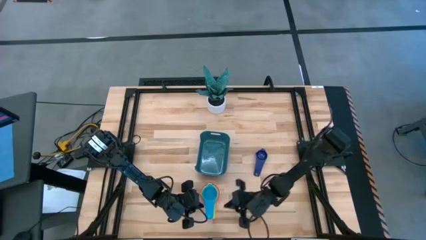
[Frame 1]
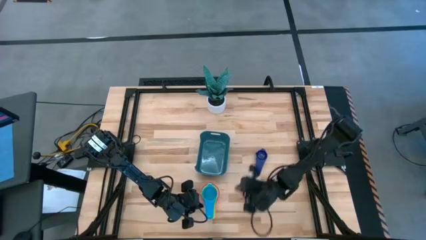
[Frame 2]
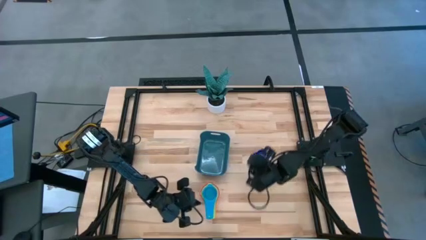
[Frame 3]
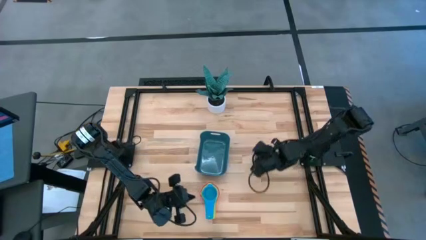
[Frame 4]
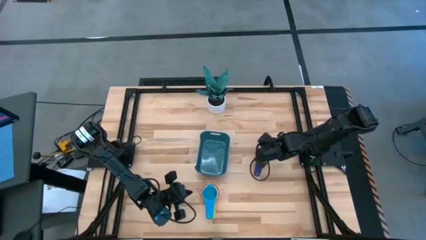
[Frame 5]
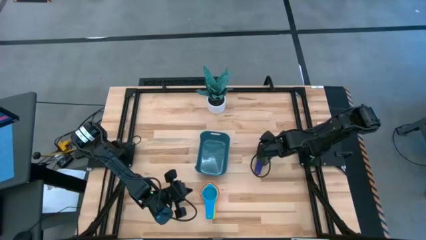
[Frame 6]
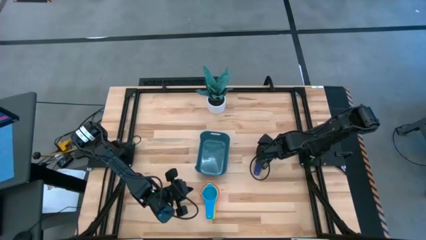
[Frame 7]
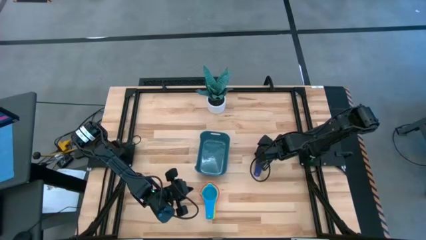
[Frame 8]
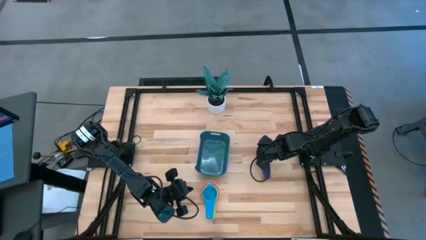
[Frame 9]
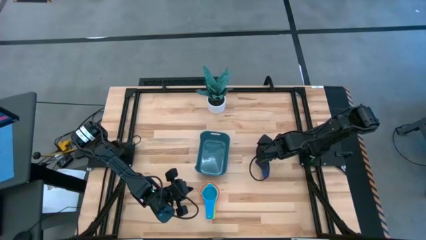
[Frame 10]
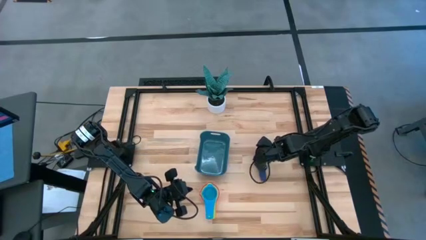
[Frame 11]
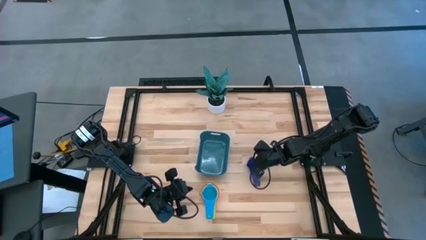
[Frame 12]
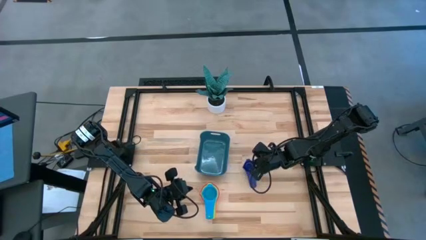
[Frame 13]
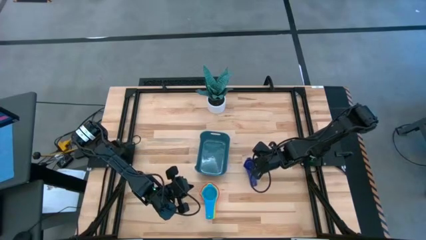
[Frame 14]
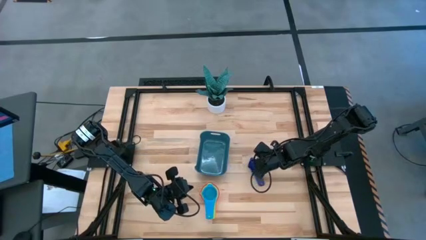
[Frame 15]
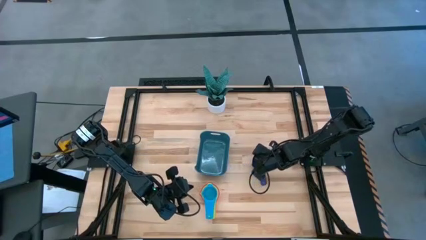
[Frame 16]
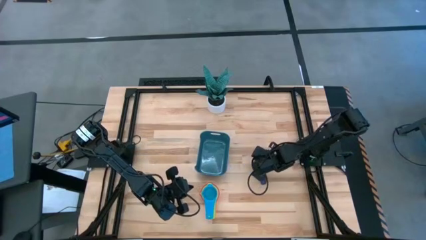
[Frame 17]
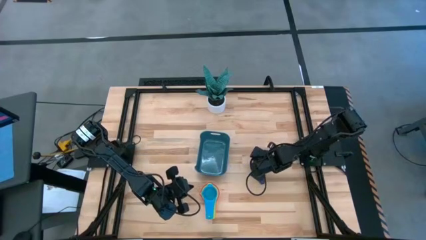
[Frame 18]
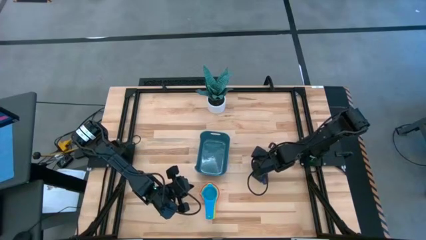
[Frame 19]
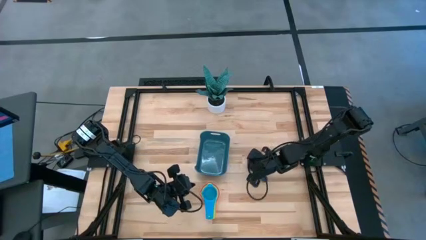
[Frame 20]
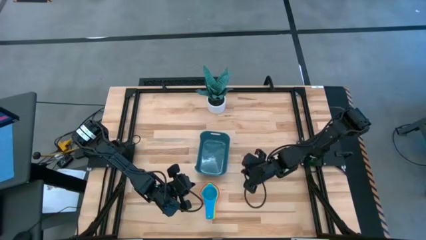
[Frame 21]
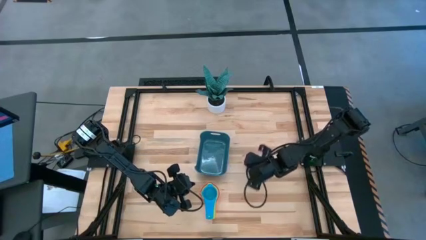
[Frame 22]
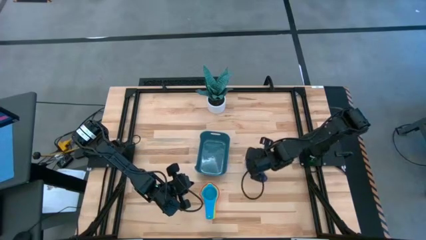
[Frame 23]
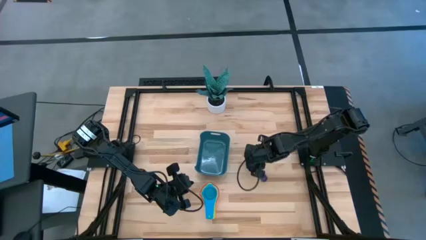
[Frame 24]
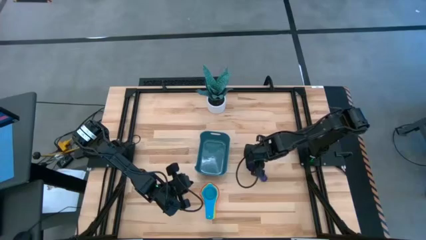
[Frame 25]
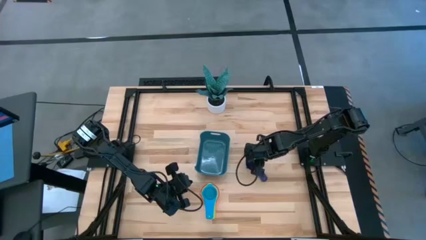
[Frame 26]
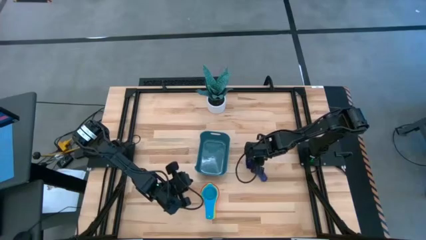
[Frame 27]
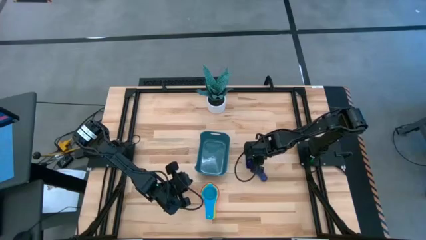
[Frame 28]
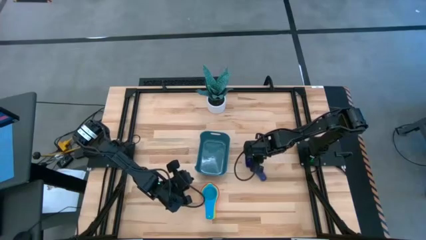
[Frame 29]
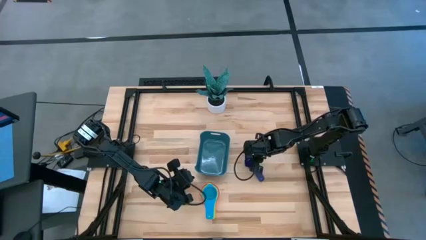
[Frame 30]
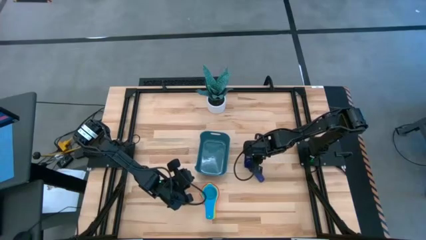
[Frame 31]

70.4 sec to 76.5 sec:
Task: Nest measuring cups in basket
Stack the dark blue measuring cup on top of the light blue measuring cup

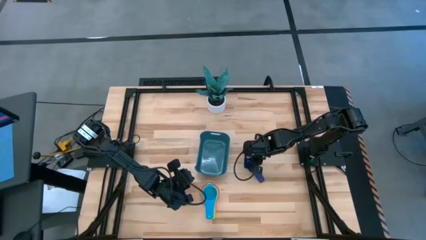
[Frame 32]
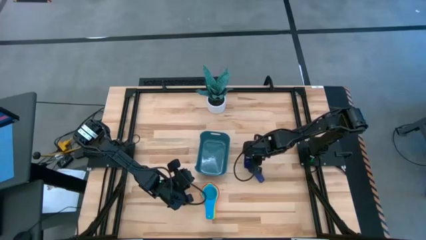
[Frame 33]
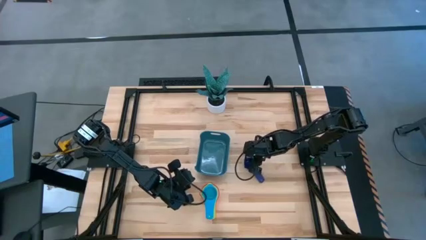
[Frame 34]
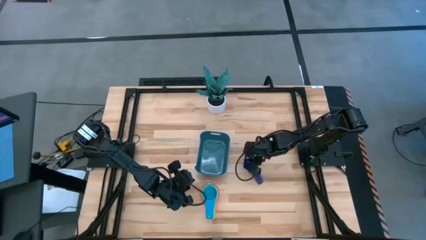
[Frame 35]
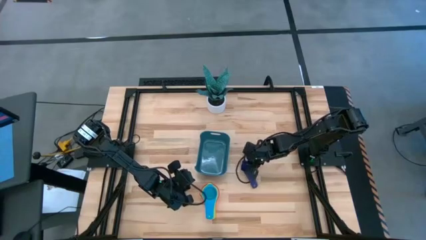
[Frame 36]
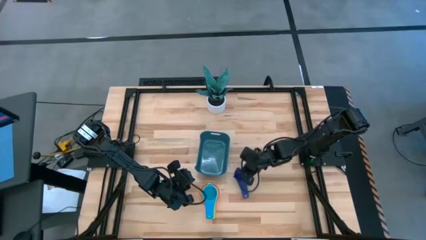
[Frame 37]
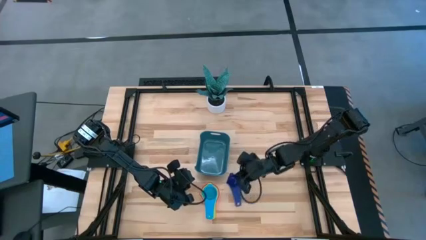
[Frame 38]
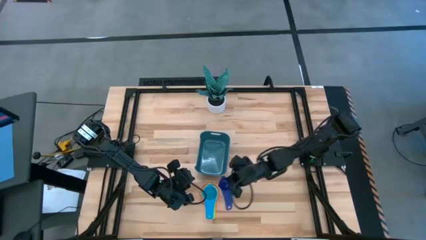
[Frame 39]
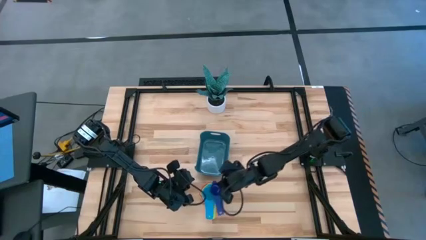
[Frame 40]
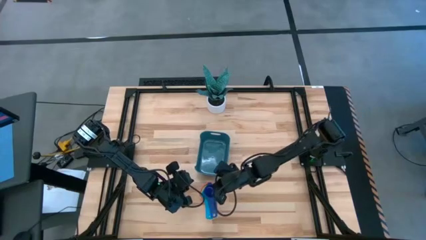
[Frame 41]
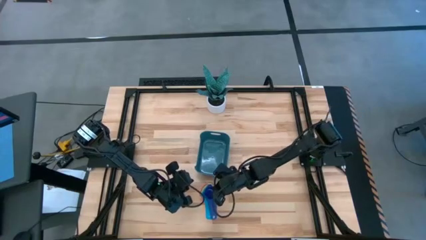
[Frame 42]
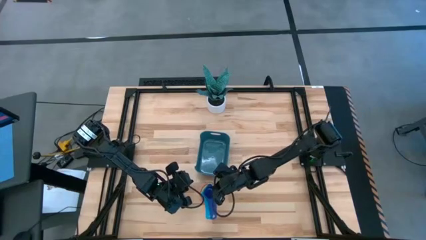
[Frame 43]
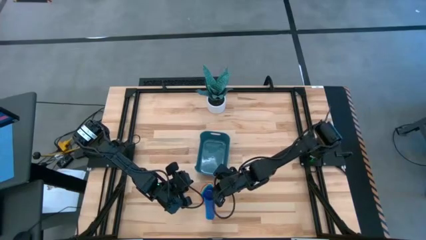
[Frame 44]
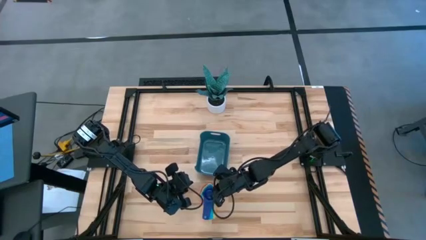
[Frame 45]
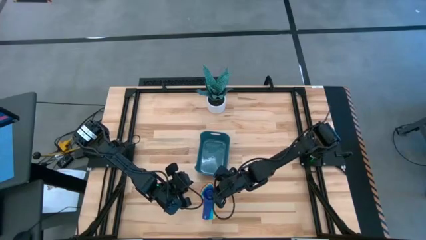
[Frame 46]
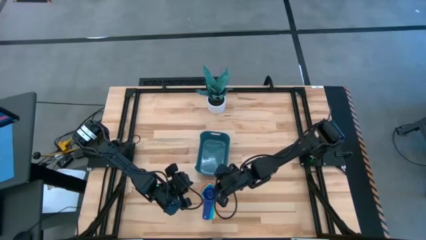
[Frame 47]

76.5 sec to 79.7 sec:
Stack the dark blue measuring cup on top of the light blue measuring cup

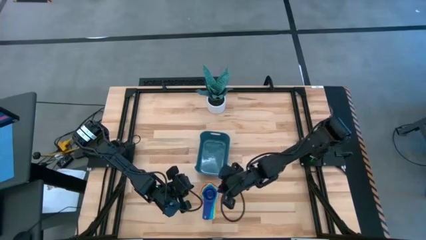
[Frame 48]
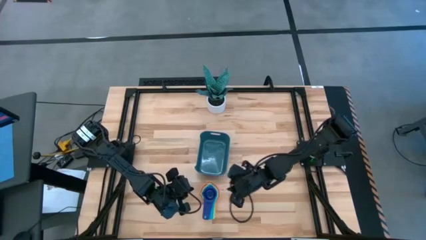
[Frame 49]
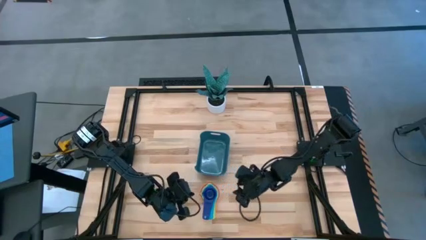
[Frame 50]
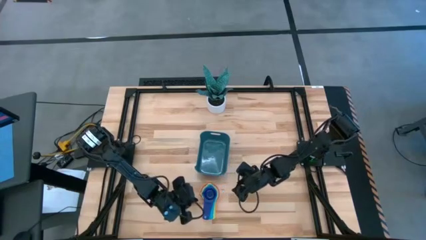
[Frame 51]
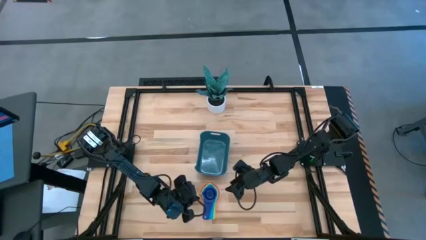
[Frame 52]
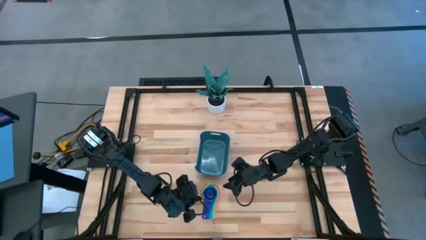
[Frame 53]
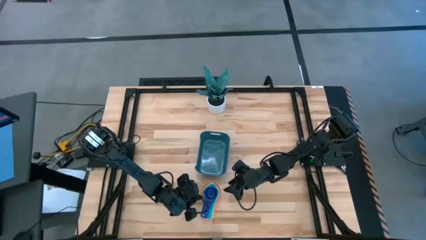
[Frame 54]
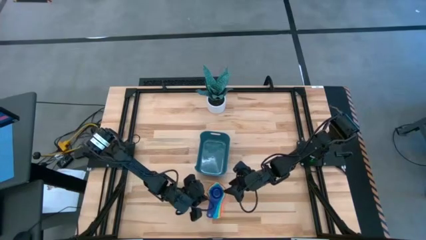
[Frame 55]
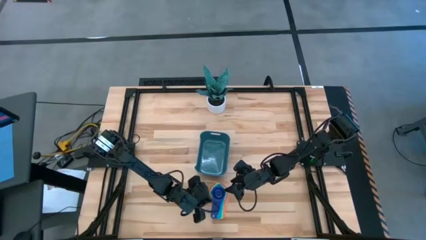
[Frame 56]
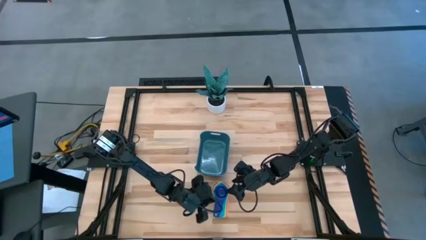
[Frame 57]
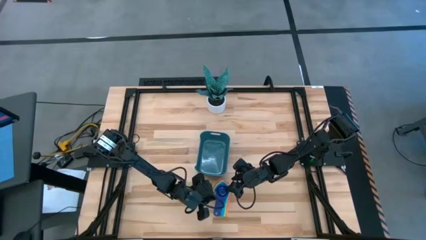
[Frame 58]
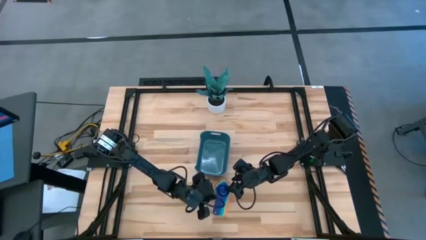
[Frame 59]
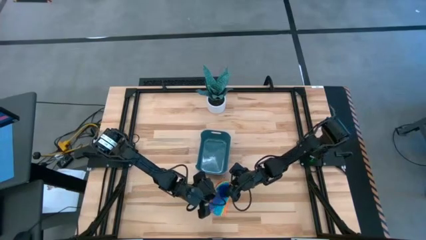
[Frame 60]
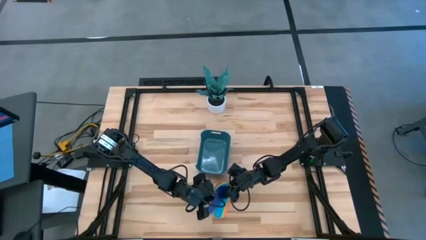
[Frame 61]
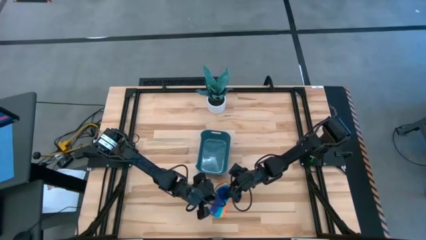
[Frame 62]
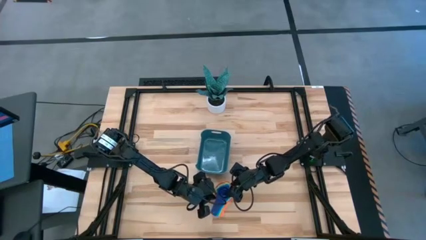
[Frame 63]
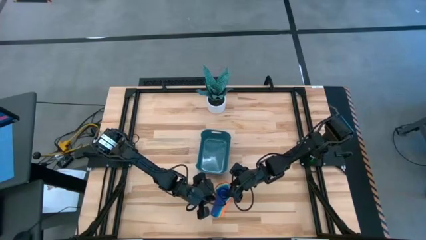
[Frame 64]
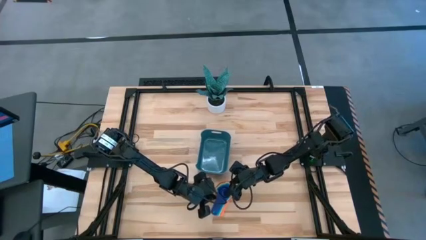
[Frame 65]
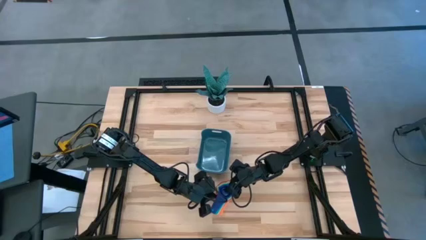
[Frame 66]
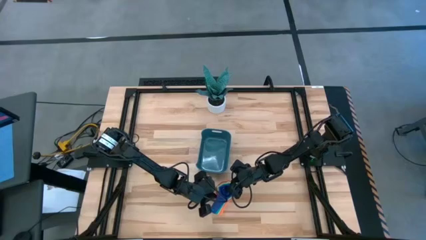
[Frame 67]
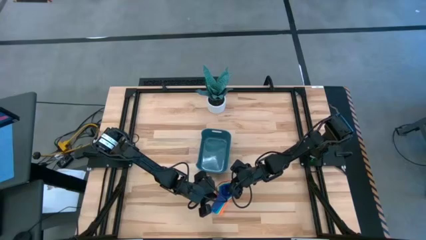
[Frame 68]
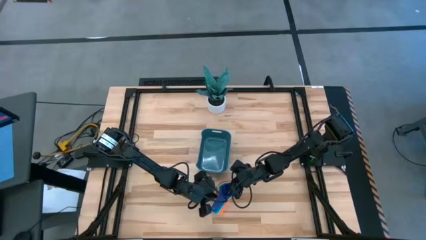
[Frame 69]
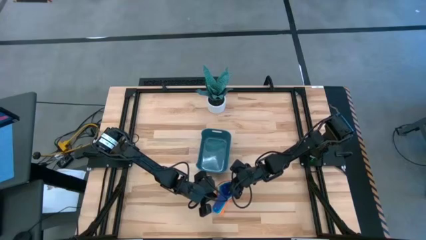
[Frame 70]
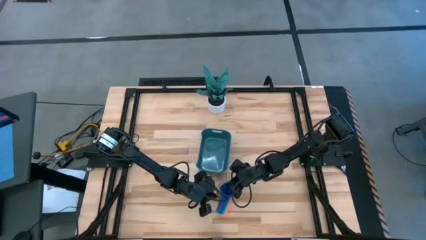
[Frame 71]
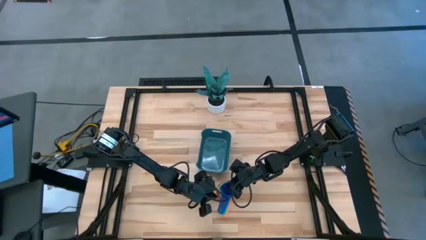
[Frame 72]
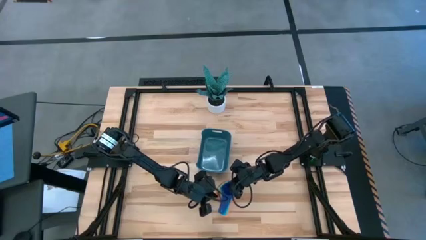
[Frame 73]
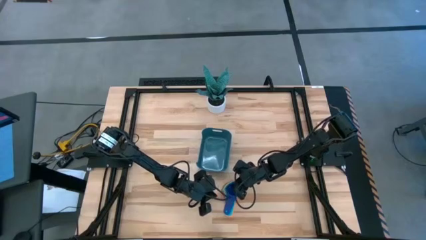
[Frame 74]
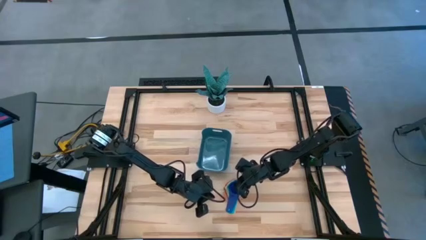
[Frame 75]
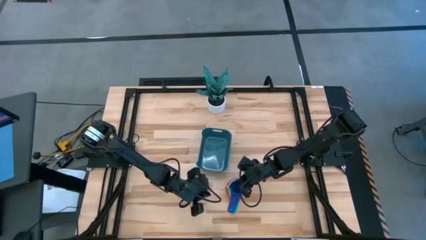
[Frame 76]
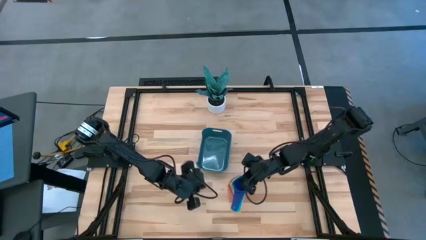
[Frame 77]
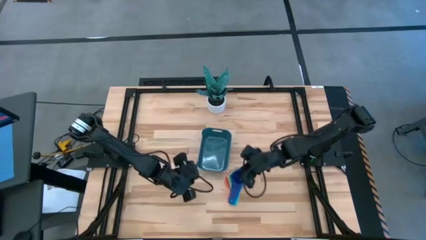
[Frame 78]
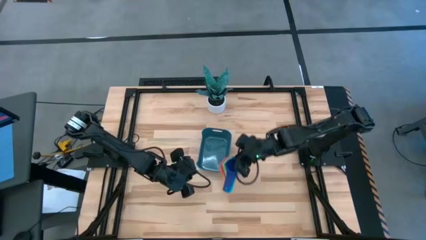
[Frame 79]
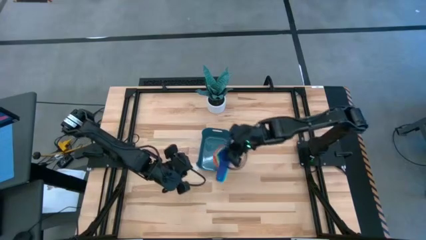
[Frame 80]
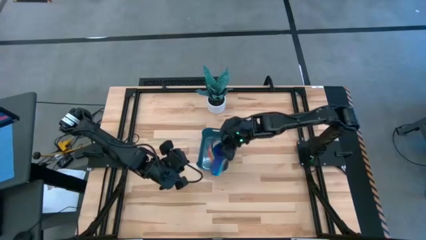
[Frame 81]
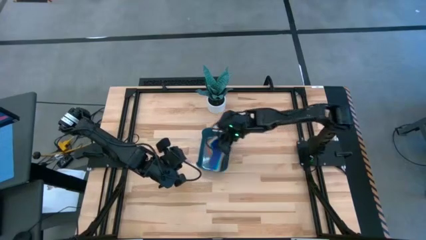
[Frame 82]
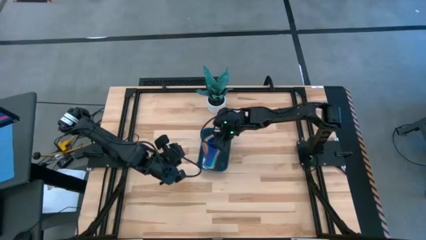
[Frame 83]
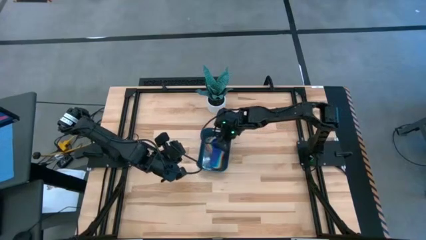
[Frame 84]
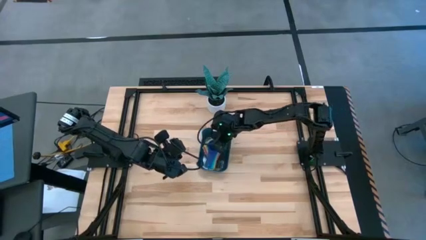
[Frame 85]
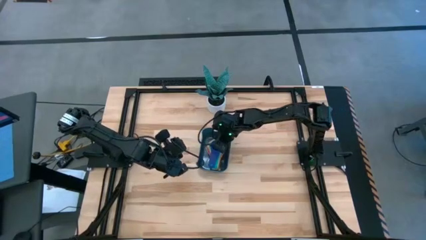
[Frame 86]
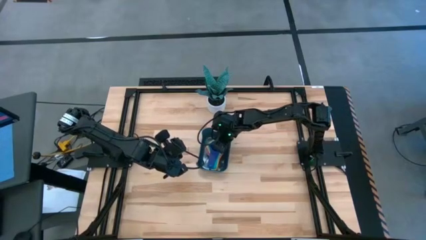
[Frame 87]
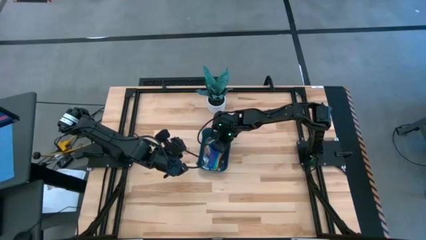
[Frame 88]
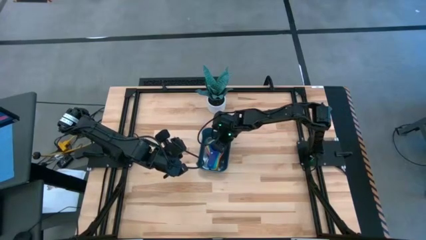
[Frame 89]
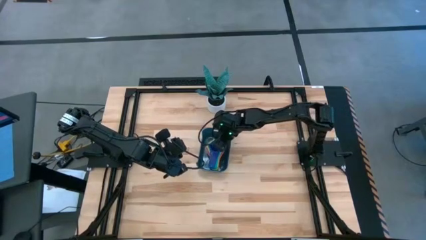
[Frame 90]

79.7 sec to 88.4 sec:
Put the stacked colored measuring cups into the blue bin
